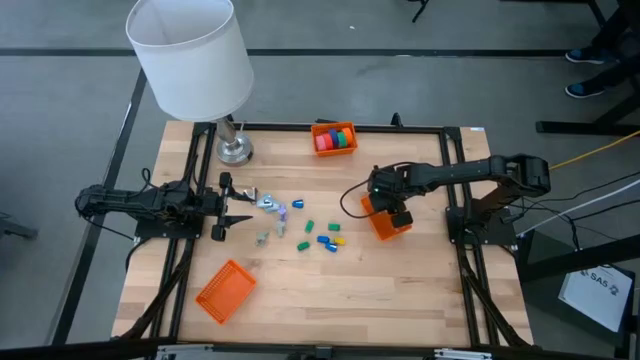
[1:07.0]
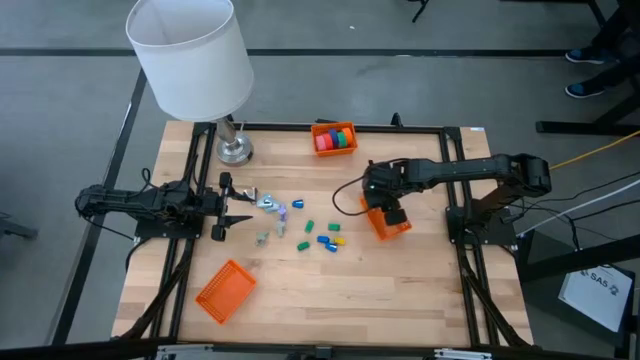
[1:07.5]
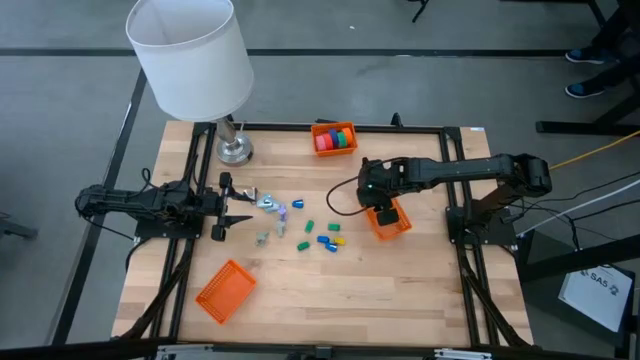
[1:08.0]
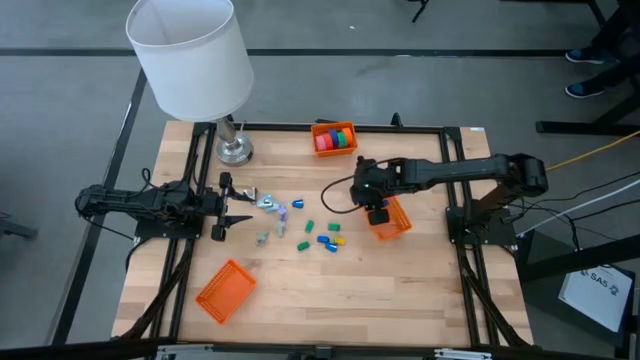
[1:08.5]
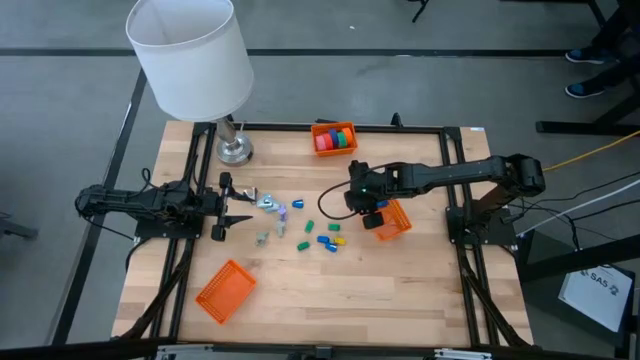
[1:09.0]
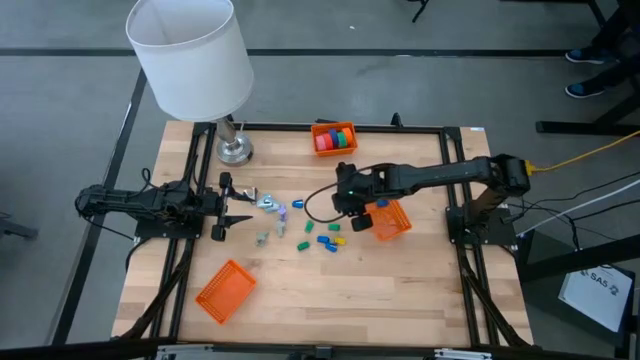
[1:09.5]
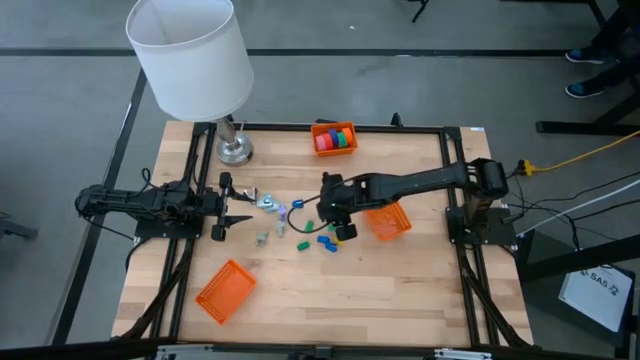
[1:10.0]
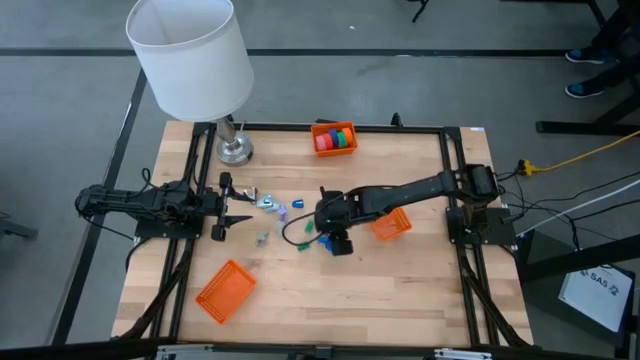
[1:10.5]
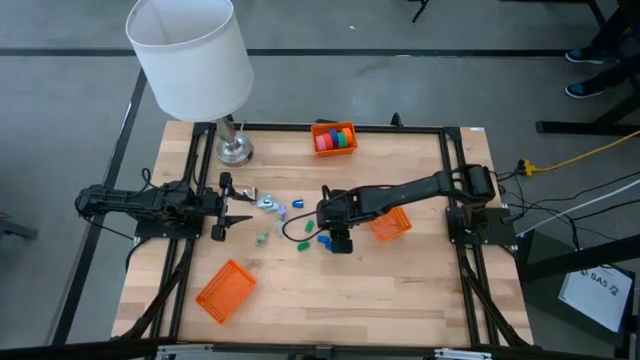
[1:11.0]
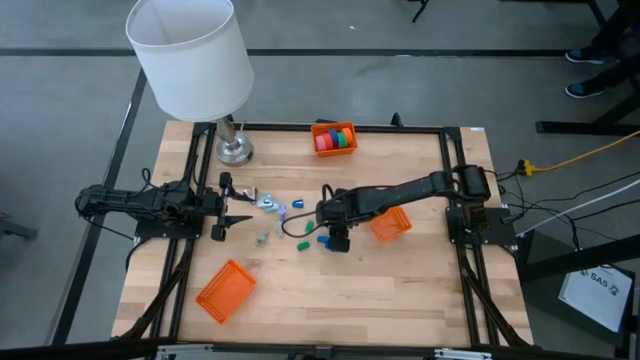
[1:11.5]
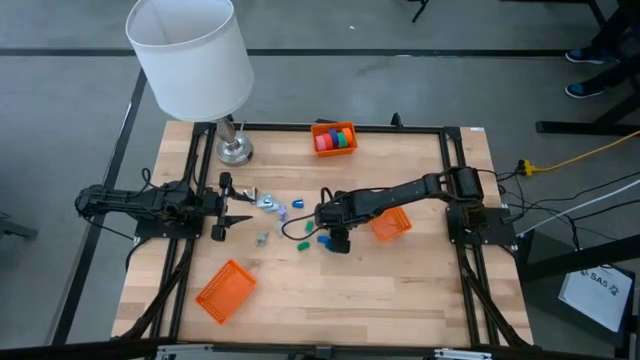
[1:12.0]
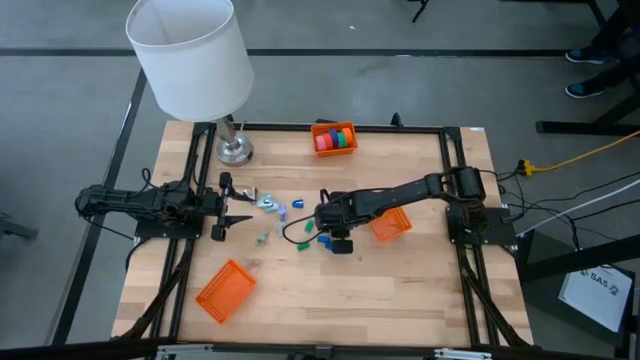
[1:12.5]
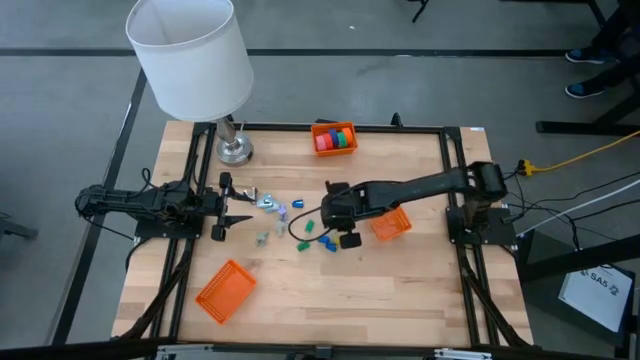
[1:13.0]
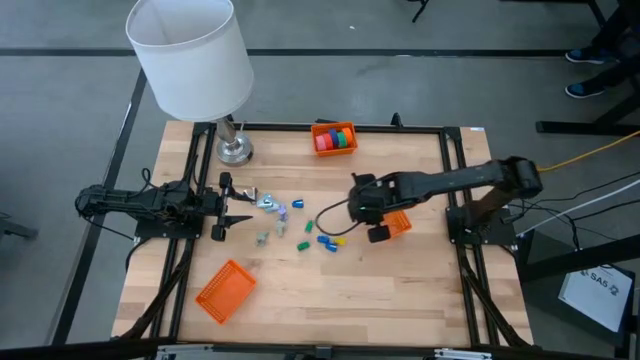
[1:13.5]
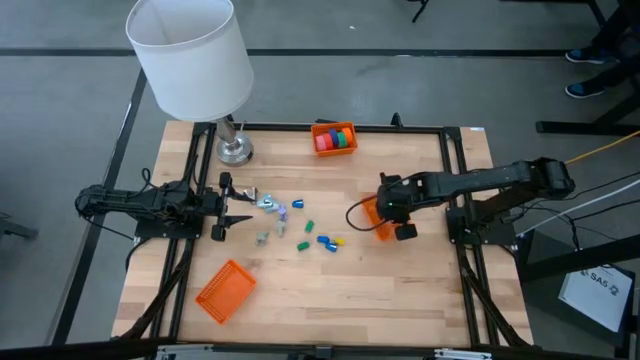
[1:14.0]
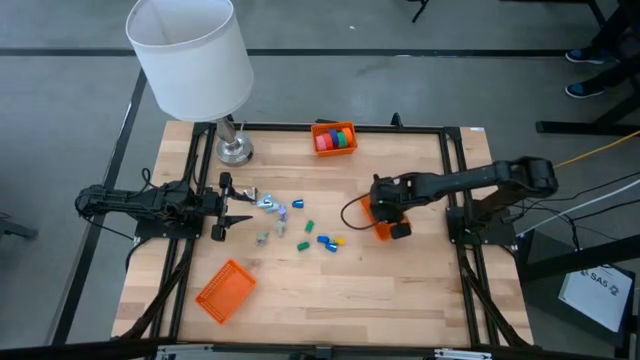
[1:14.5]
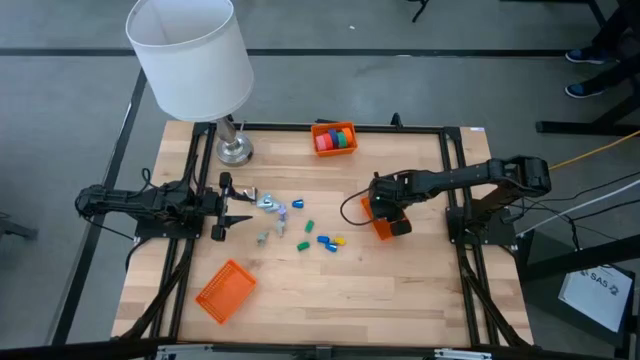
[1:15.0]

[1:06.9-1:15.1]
Task: Pick and place Stapler, Stapler remover, tape
Put the green stapler into the middle orange bin

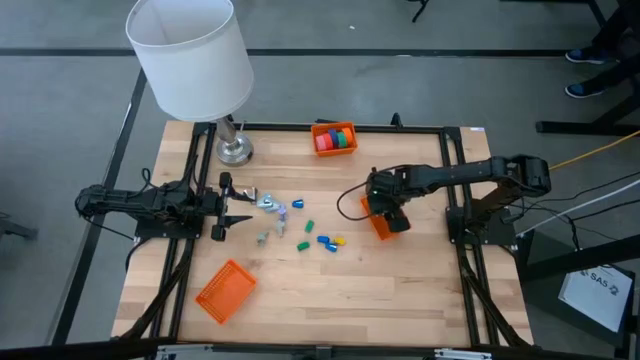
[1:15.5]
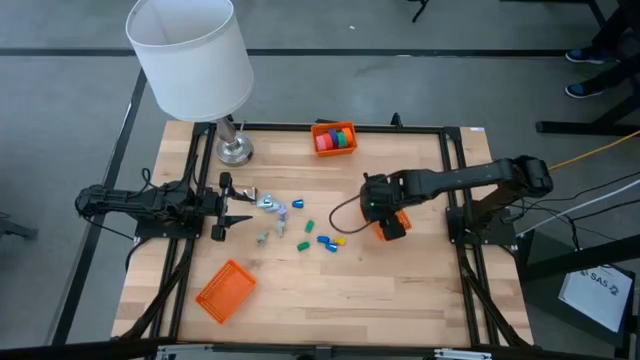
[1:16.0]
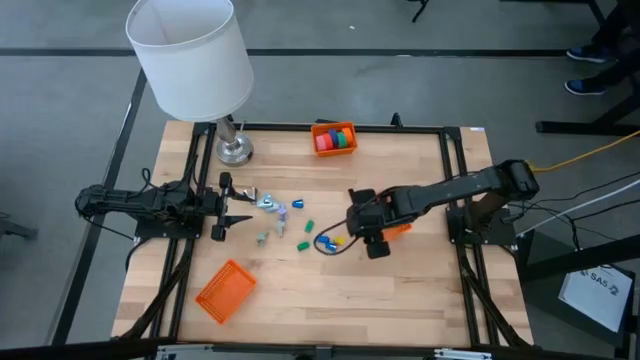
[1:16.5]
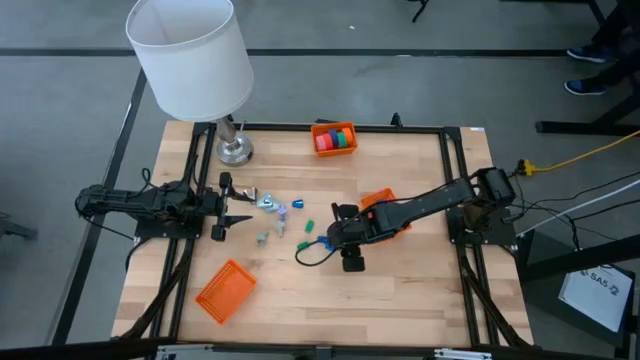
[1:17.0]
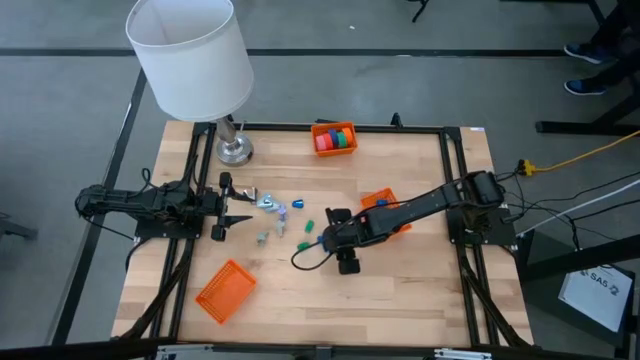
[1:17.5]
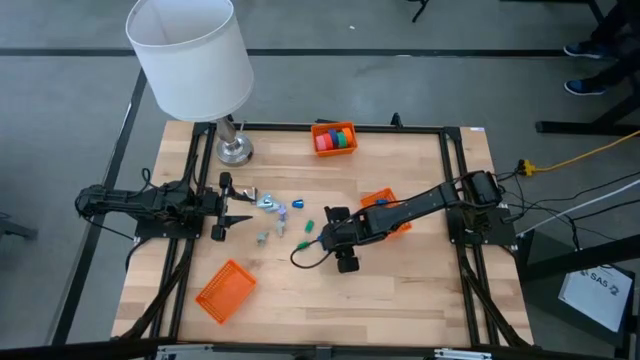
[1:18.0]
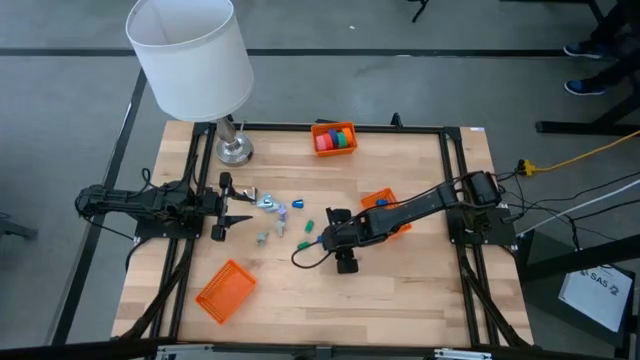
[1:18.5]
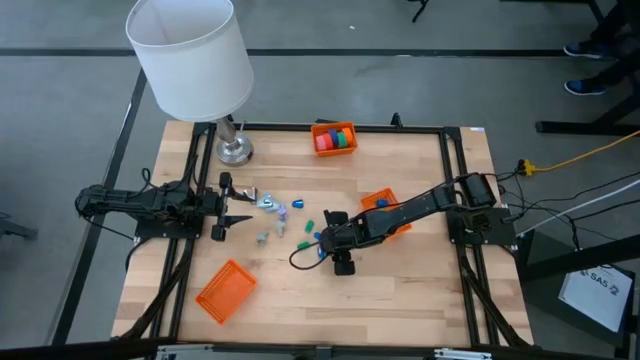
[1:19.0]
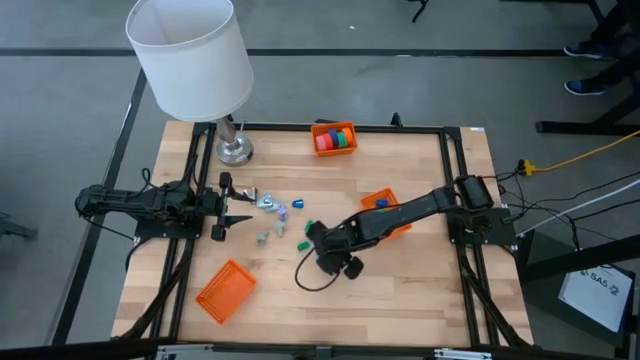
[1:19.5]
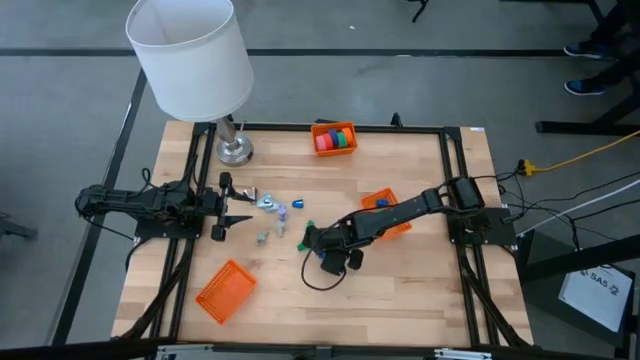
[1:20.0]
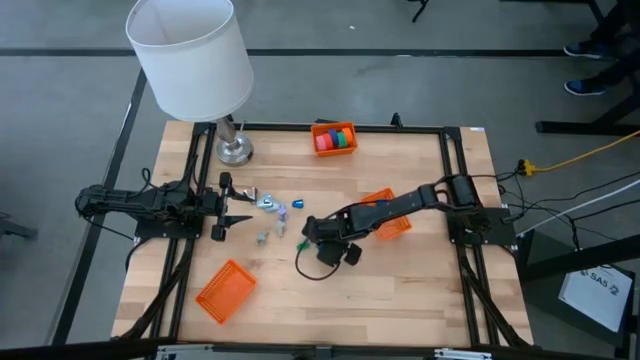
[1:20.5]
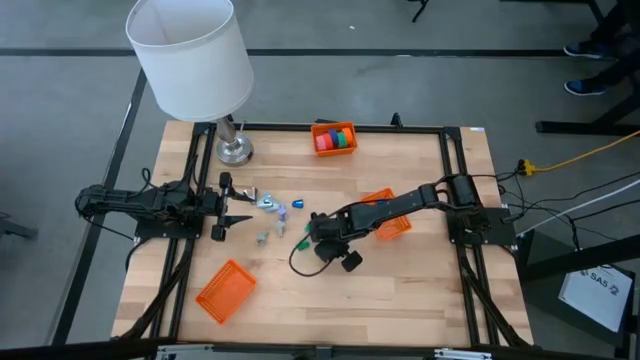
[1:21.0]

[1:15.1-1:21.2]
Put the blue stapler into the middle orange bin

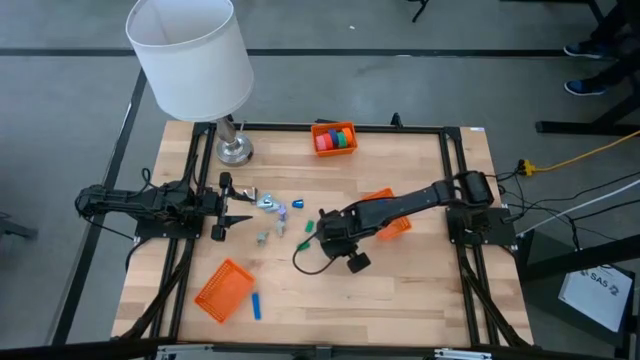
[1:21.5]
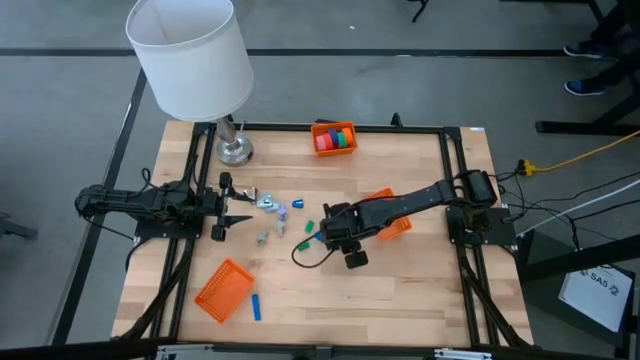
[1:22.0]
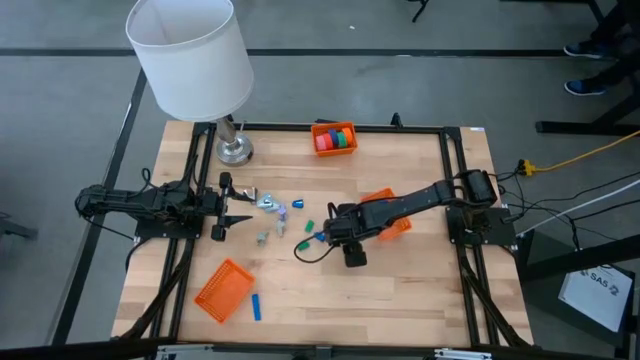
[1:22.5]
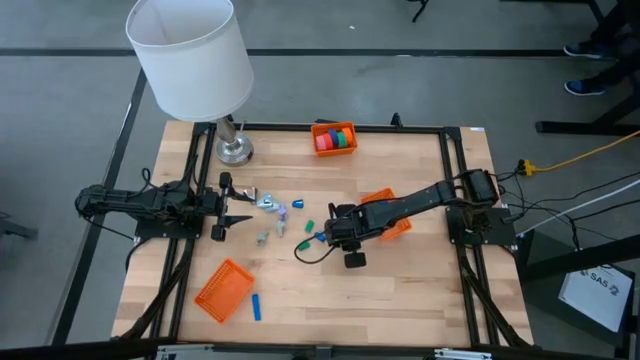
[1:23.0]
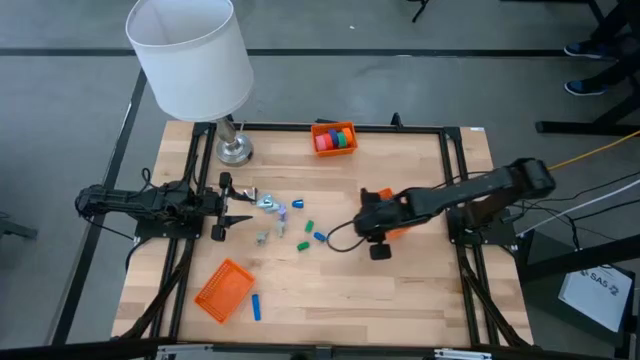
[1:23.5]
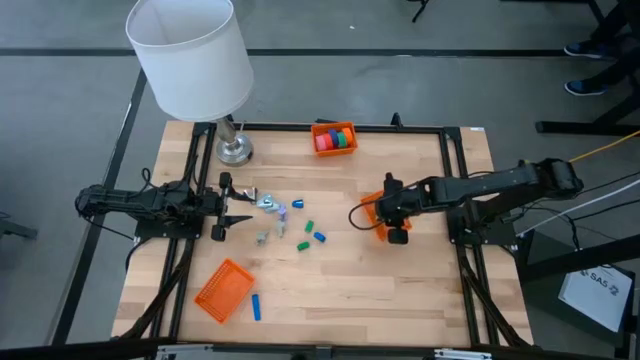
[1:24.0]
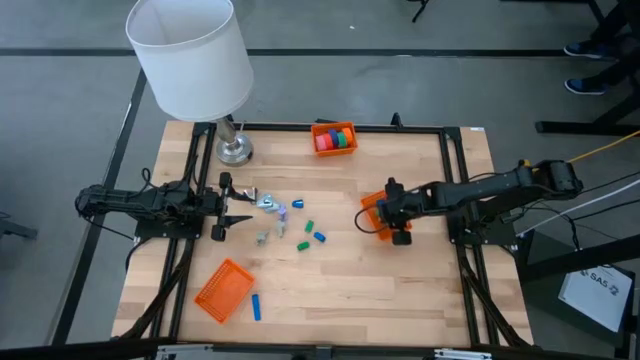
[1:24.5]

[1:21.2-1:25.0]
Put the yellow stapler into the middle orange bin

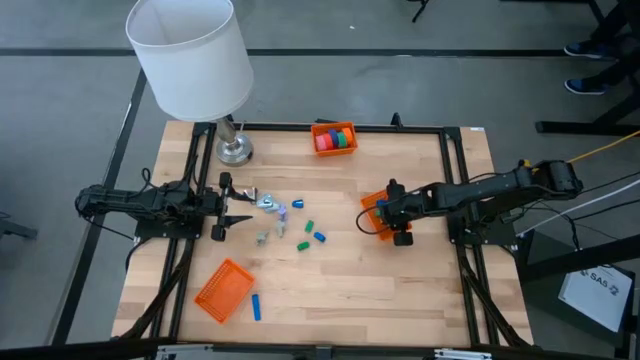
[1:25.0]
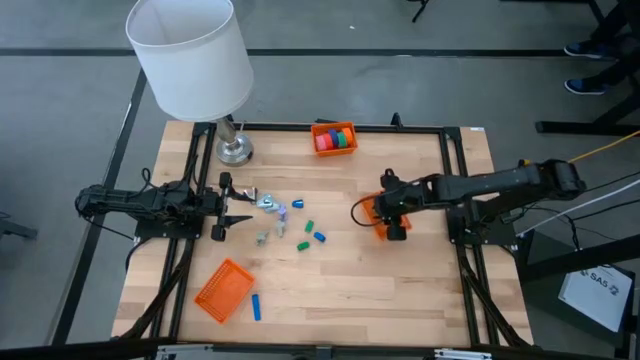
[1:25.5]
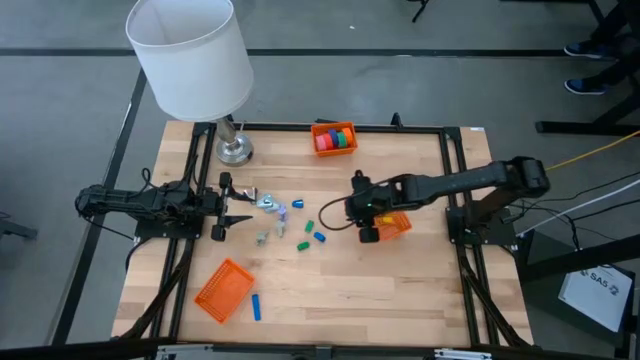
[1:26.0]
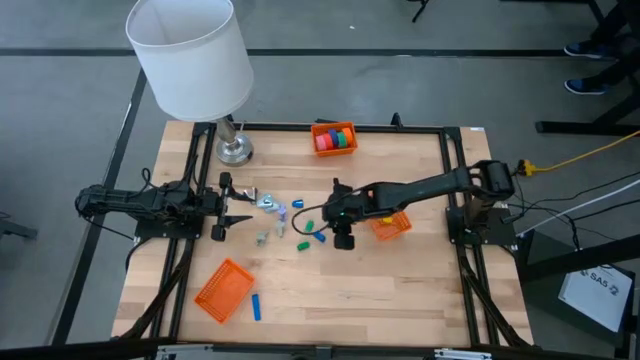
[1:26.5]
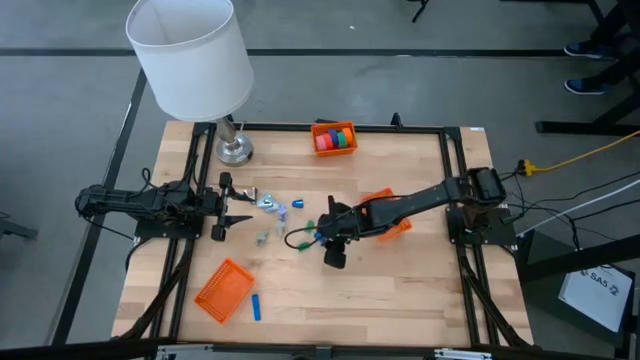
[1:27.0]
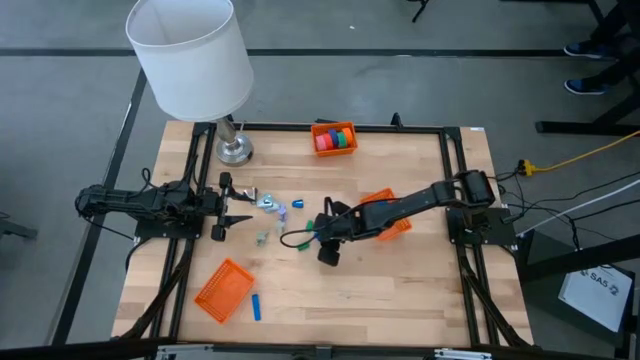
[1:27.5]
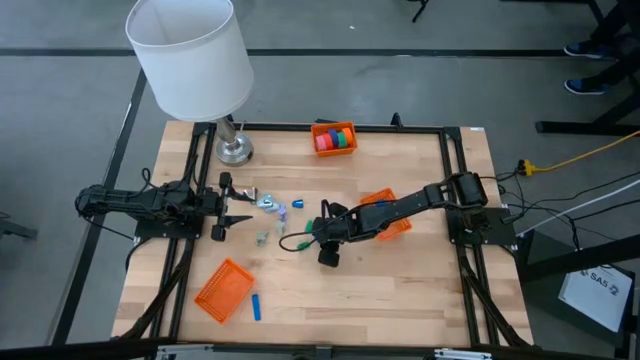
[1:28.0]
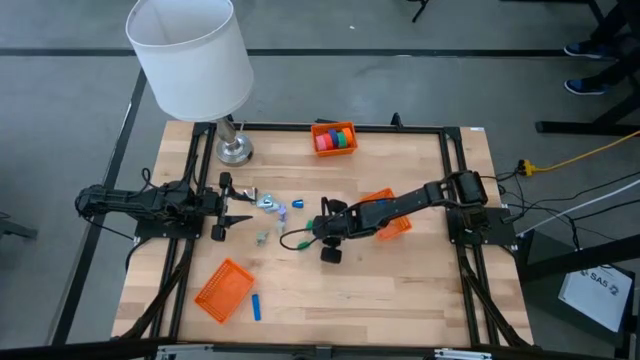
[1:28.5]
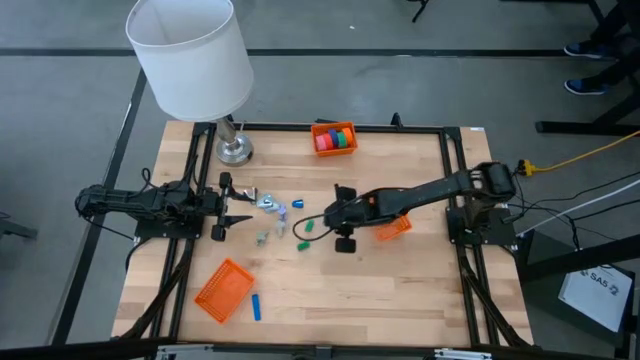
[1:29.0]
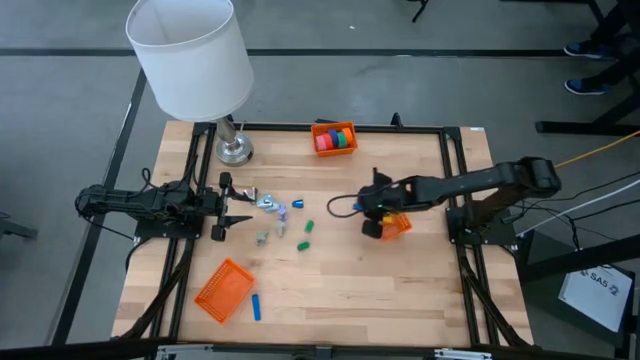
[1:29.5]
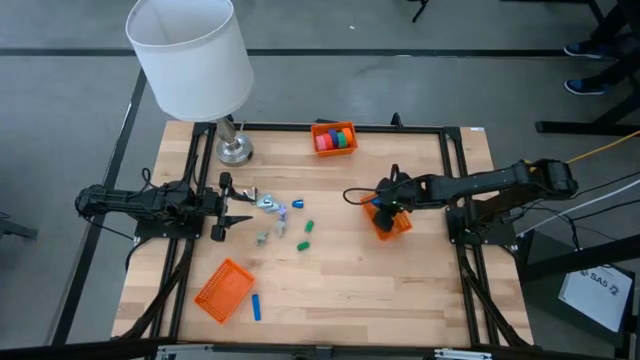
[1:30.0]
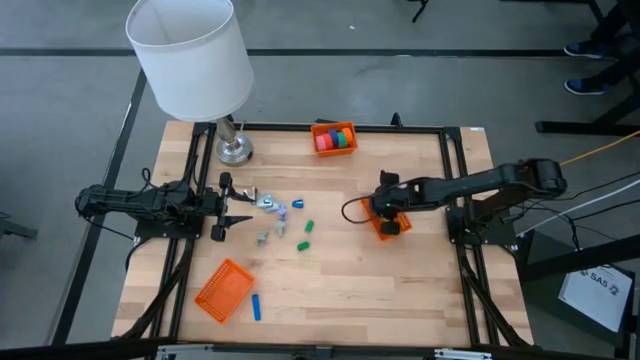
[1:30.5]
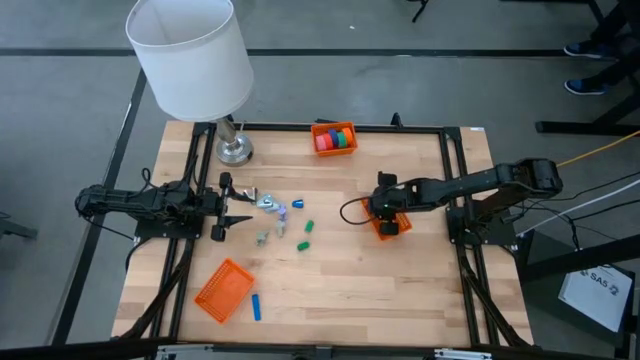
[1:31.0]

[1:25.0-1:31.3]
Put the blue stapler into the middle orange bin
